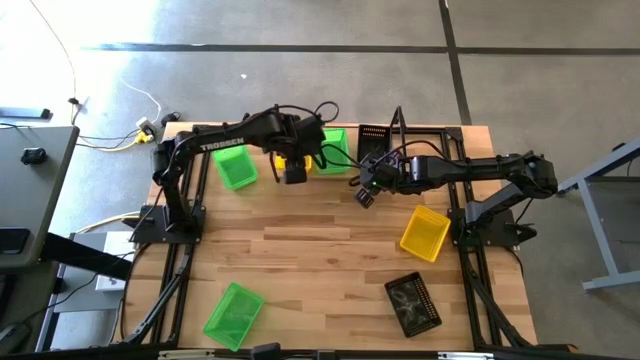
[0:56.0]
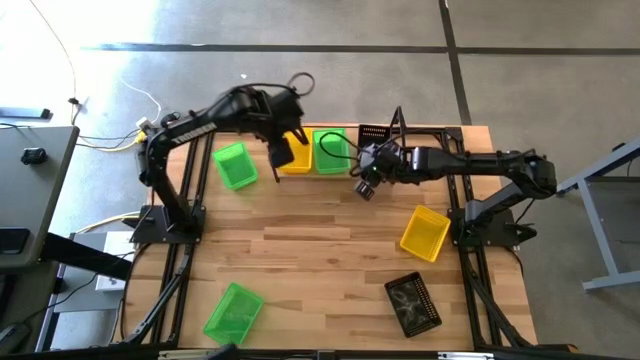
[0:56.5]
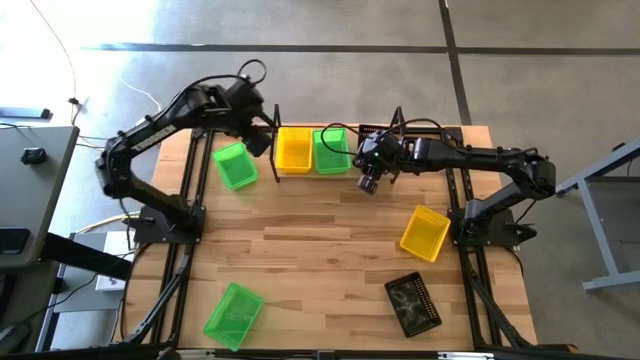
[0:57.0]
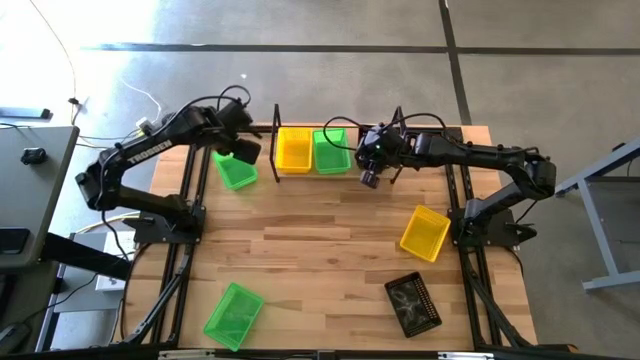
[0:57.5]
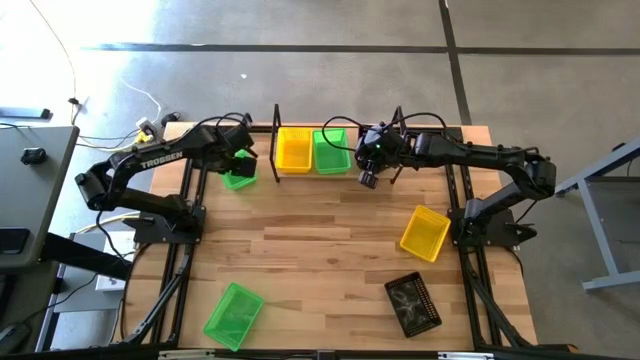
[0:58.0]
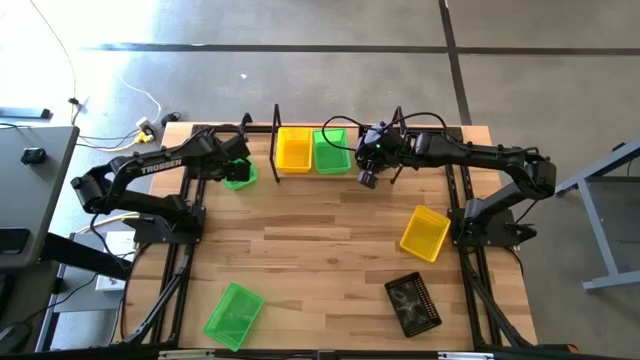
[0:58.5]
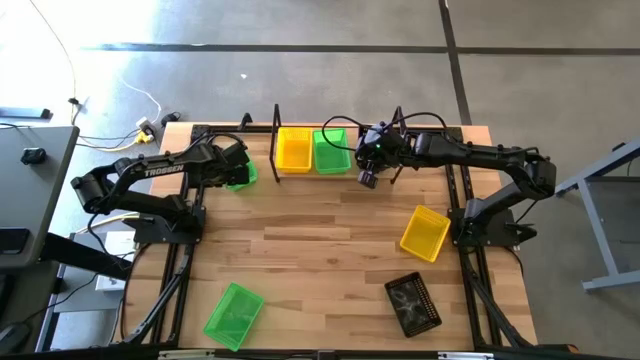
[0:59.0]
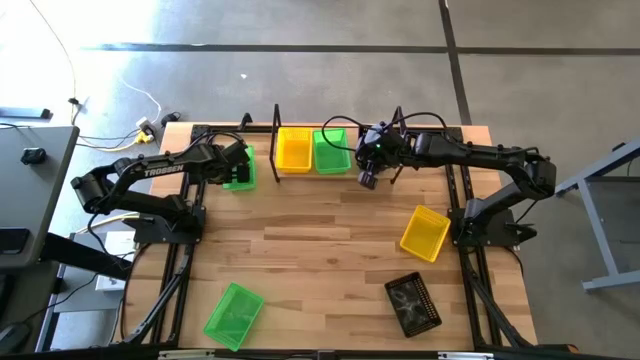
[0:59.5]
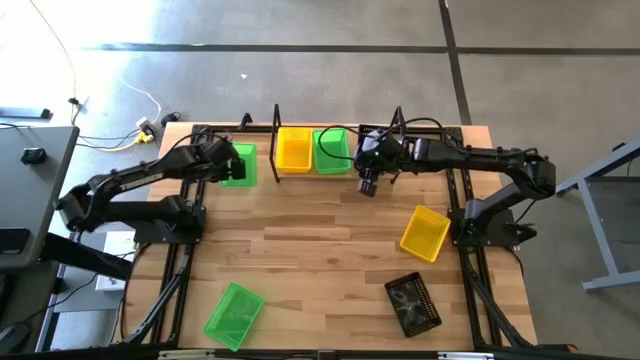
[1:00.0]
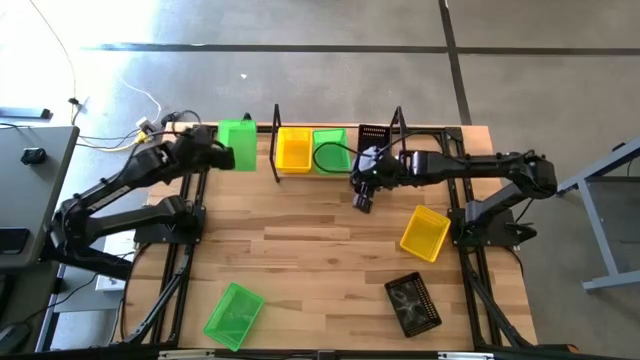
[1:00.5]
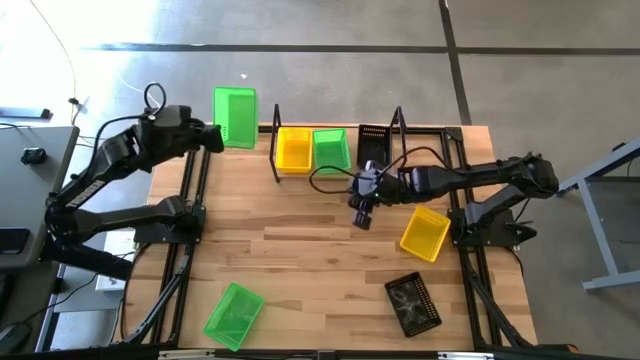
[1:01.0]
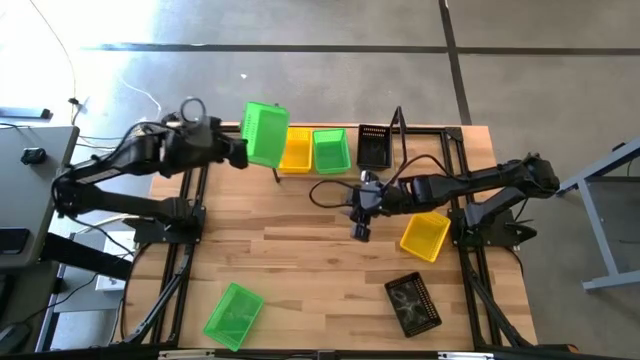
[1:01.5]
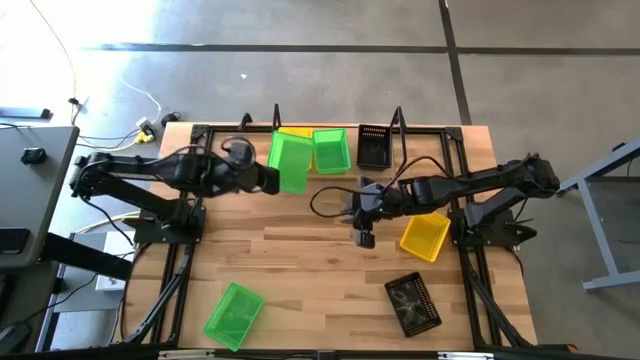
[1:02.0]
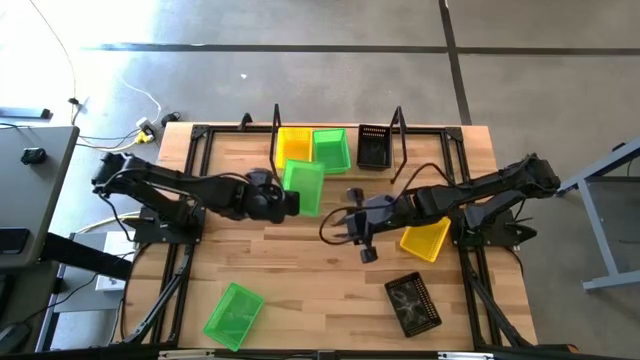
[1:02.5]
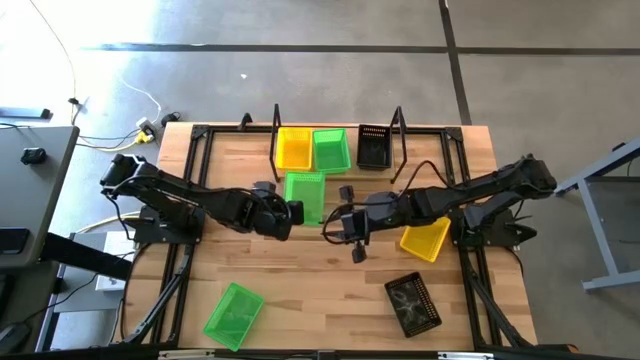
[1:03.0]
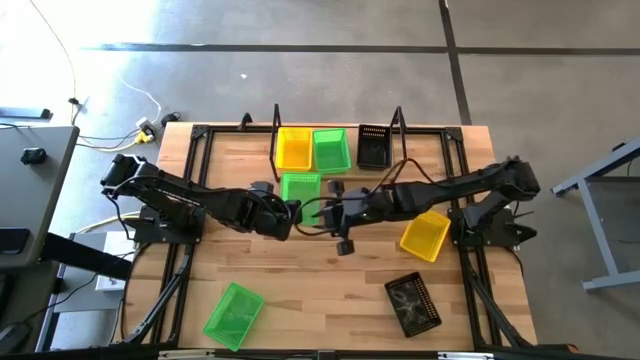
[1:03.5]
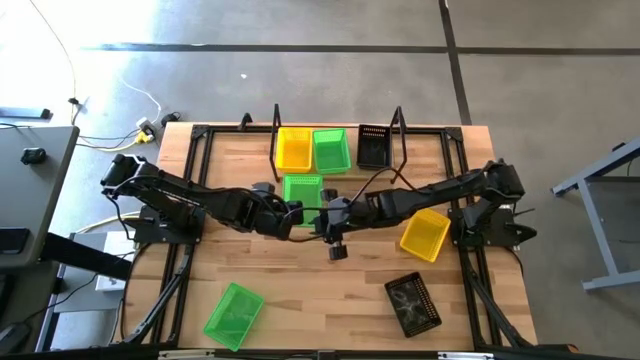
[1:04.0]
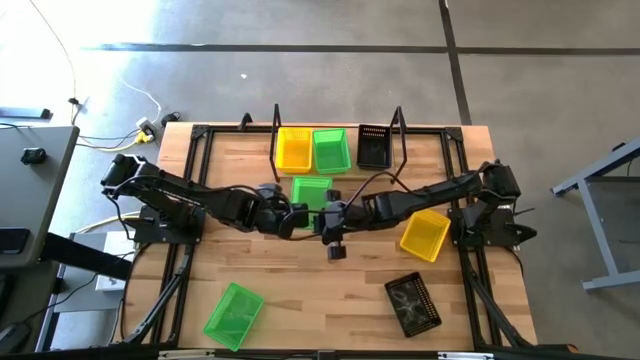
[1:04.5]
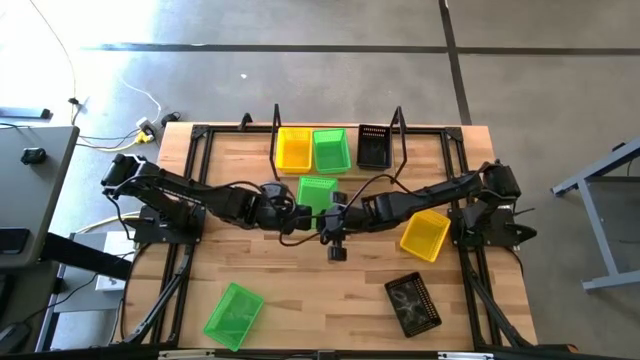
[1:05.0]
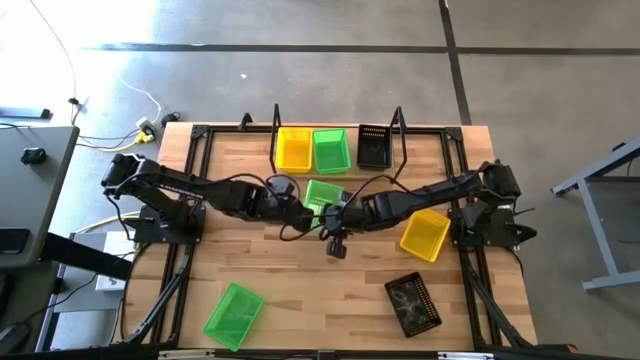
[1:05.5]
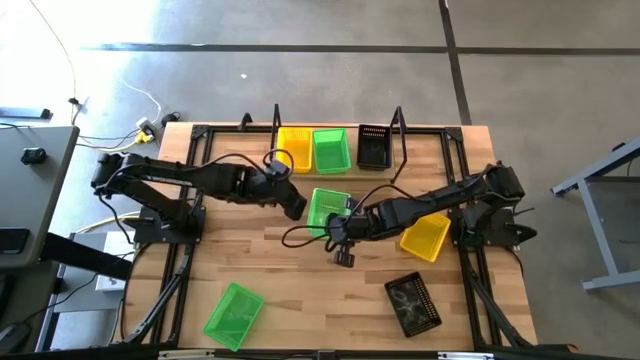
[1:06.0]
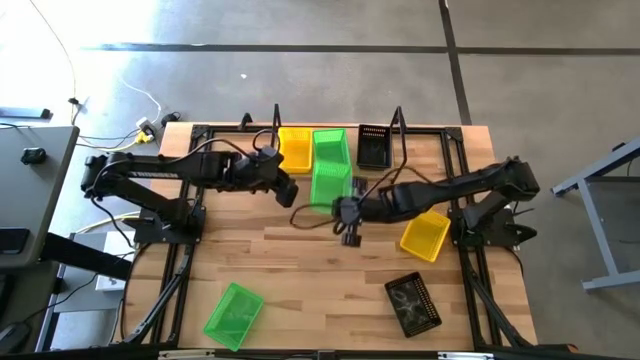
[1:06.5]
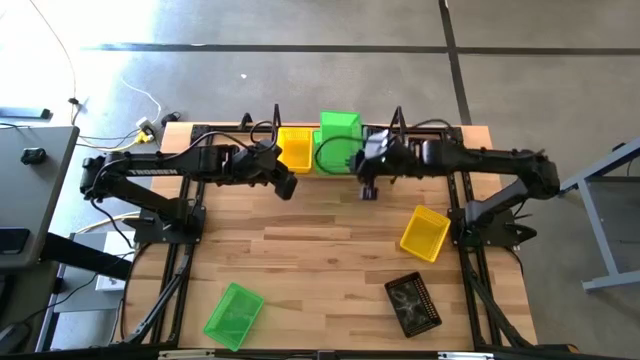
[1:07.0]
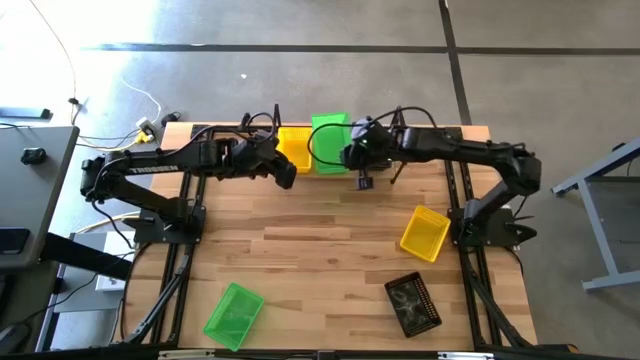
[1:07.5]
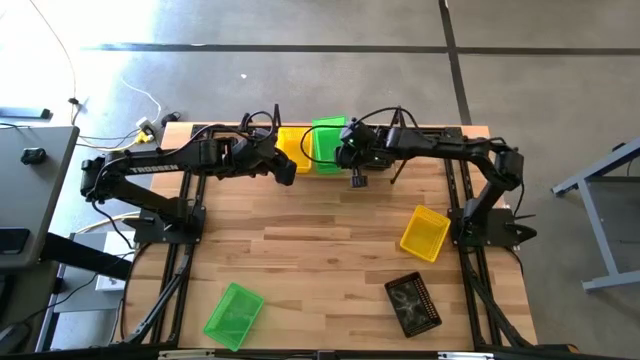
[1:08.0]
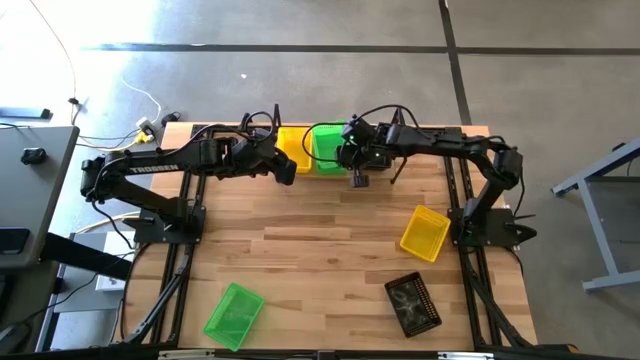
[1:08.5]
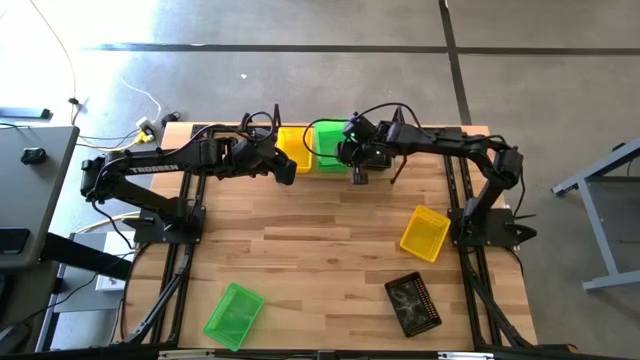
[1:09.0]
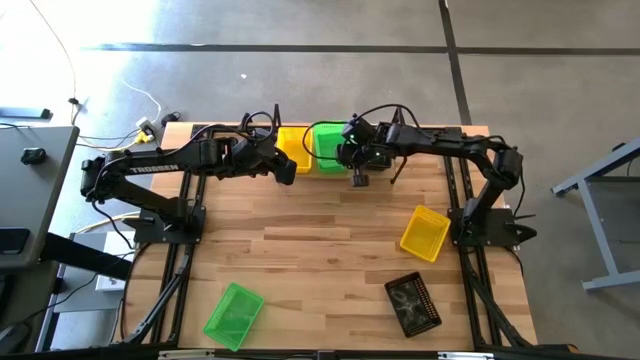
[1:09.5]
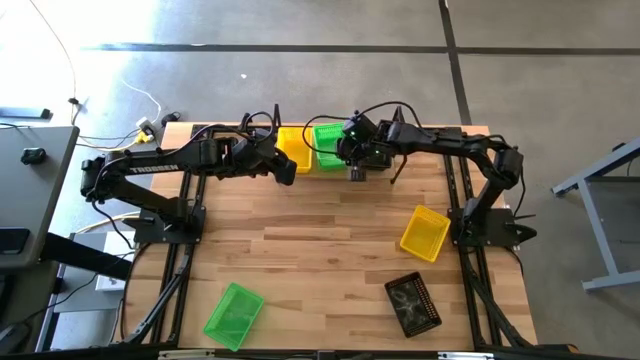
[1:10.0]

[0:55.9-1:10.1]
Task: Stack baskets on shelf by color
Stack the top green bin on the other green bin on the shelf

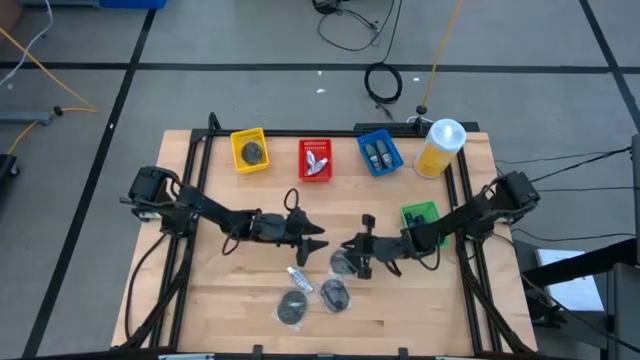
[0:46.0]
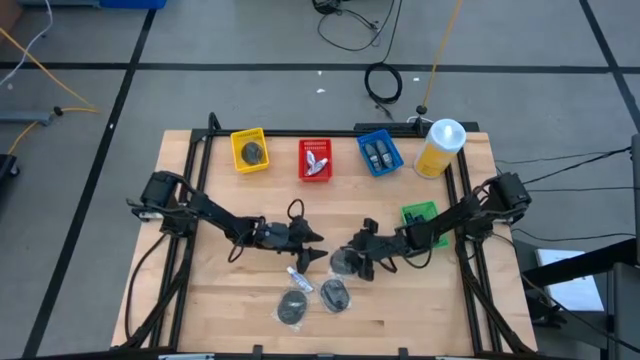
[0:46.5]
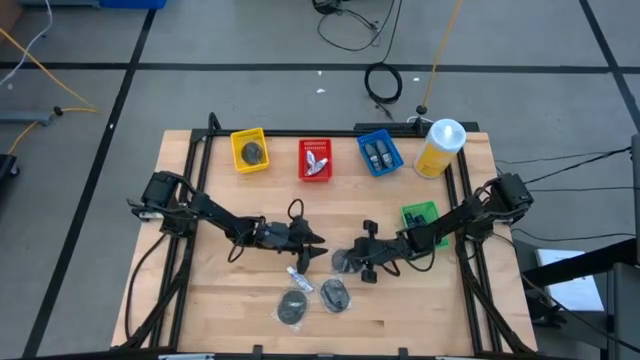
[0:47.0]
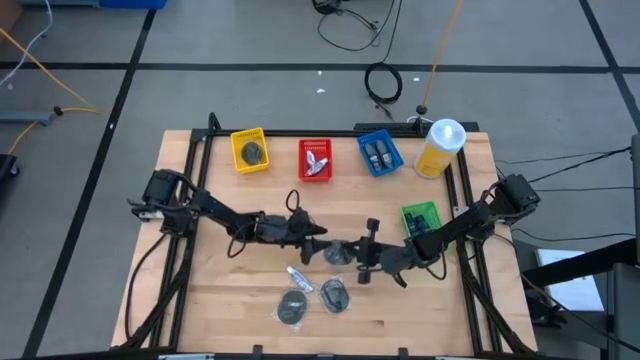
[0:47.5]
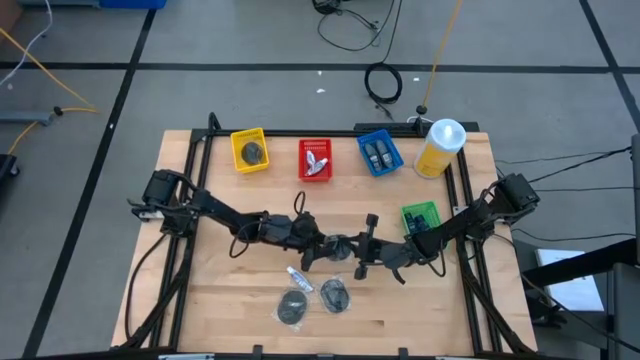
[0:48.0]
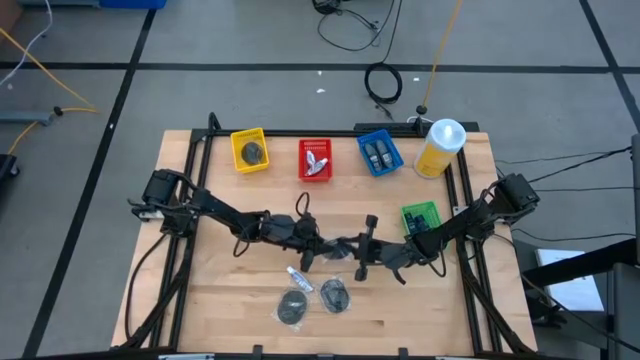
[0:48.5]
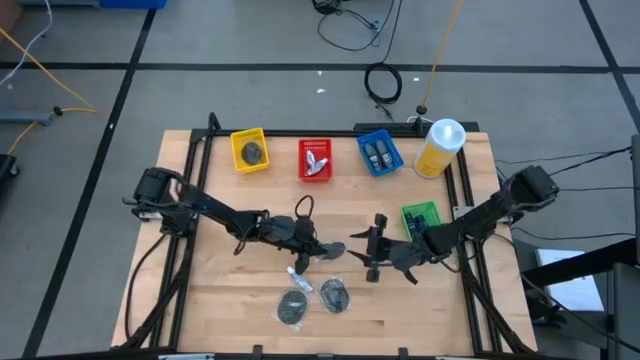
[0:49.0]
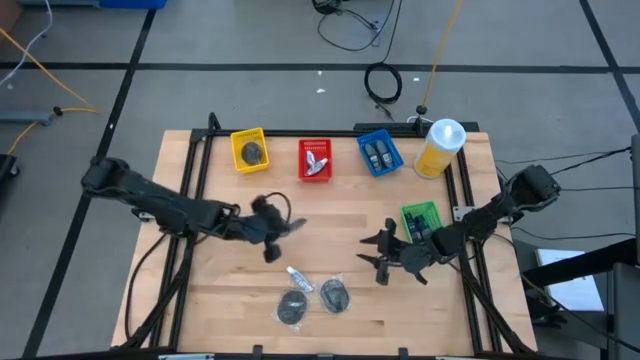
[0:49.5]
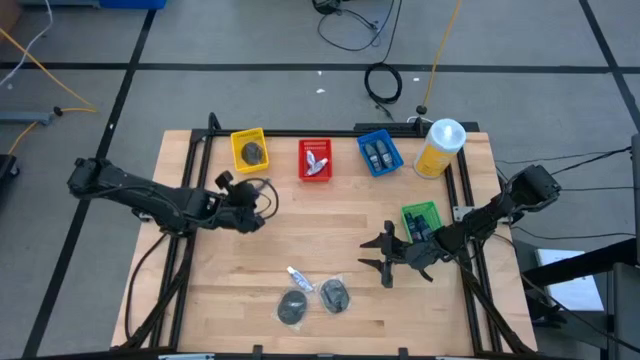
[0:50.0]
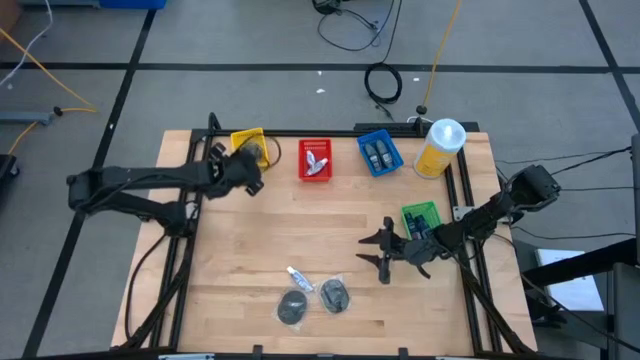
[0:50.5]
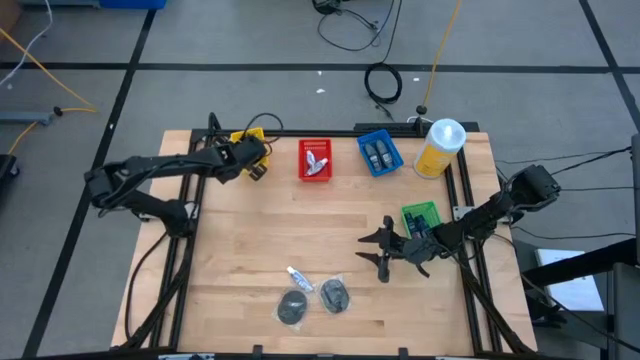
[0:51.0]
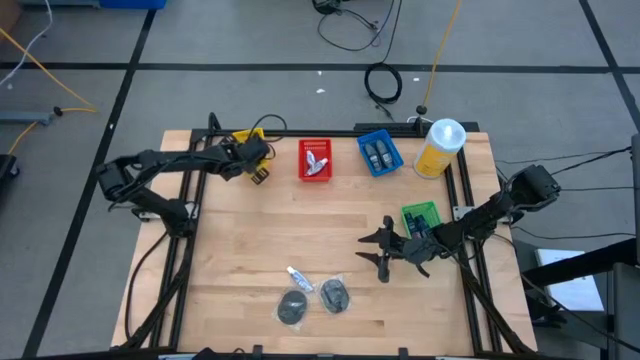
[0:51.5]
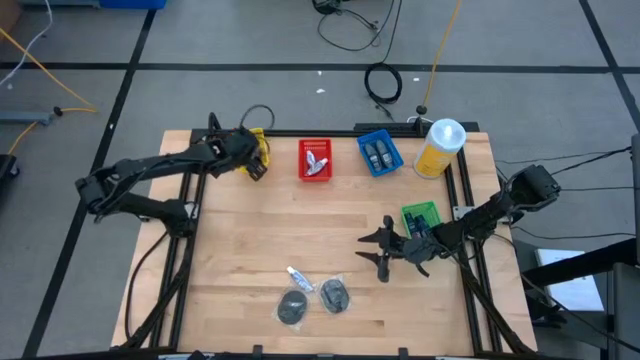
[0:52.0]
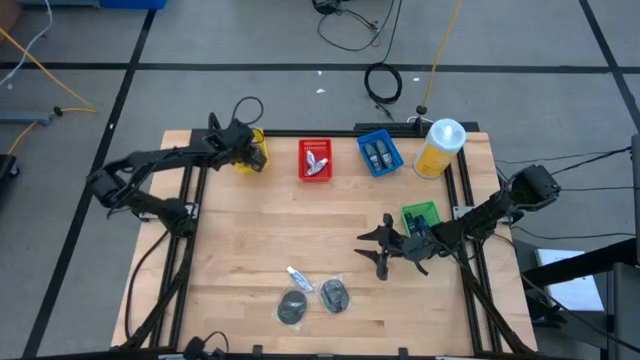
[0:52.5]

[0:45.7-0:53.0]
Task: Pick & Place Travel size toiletries
Put the black hairbrush into the yellow bin
